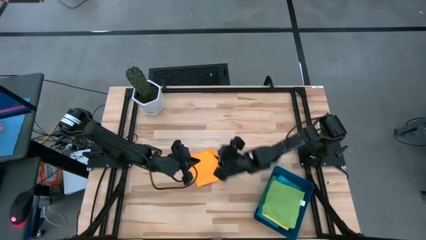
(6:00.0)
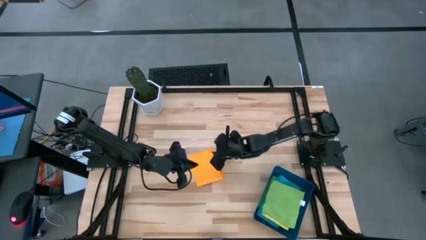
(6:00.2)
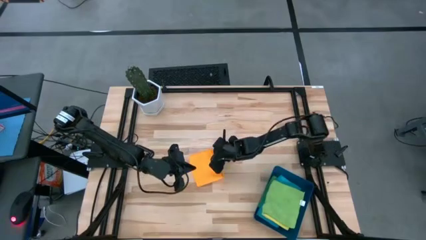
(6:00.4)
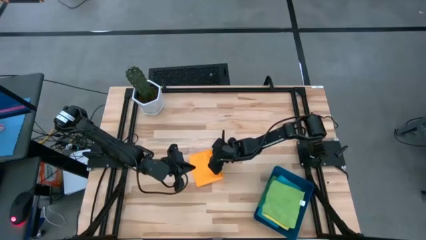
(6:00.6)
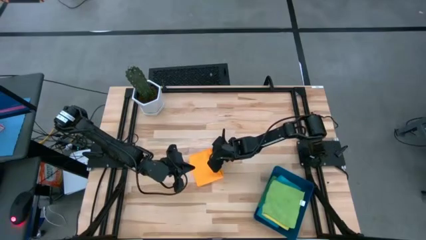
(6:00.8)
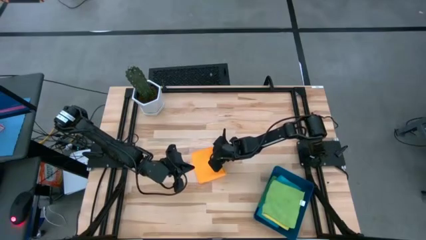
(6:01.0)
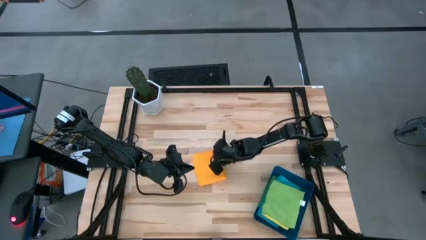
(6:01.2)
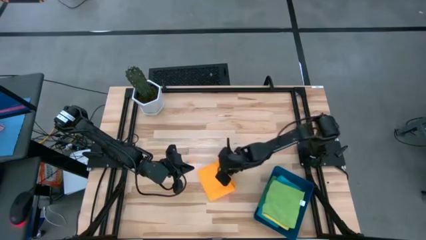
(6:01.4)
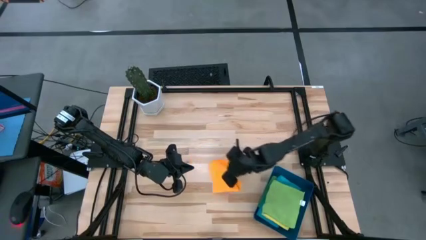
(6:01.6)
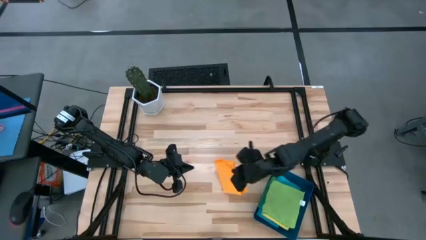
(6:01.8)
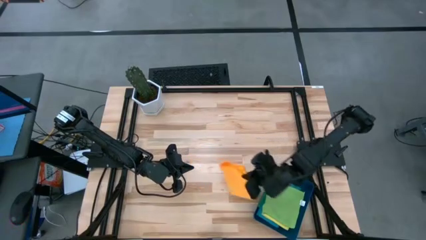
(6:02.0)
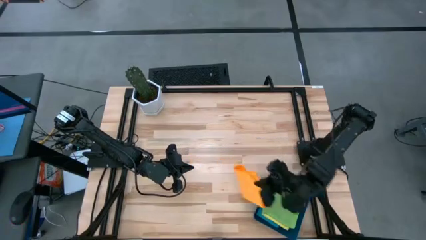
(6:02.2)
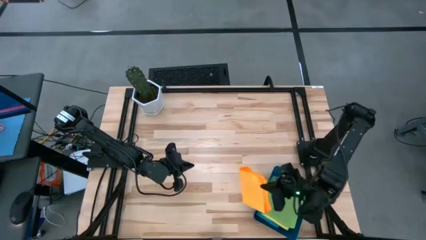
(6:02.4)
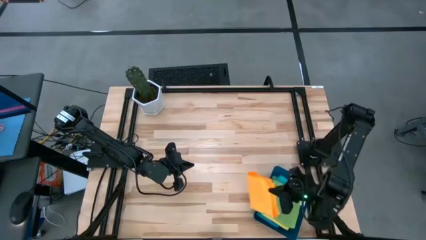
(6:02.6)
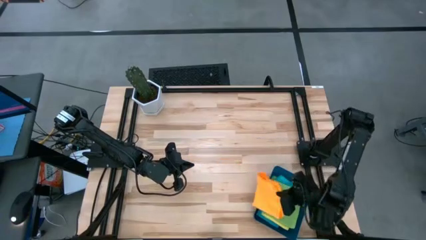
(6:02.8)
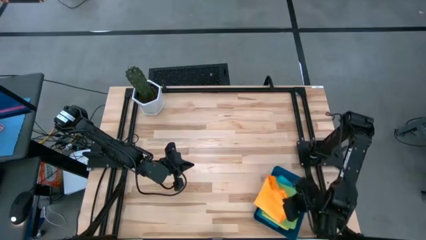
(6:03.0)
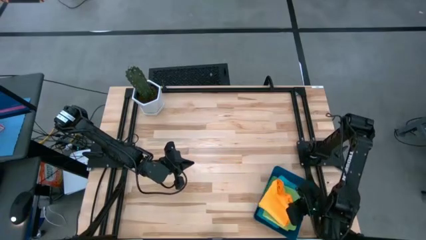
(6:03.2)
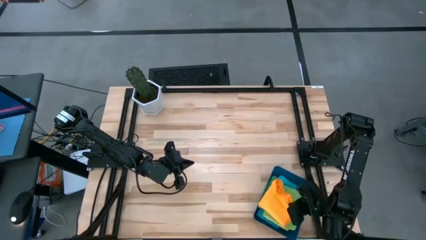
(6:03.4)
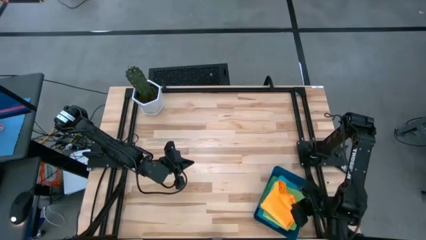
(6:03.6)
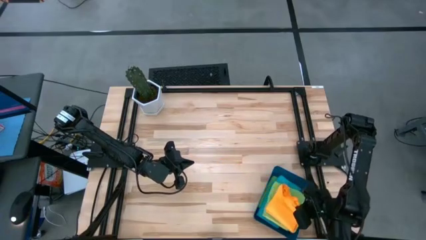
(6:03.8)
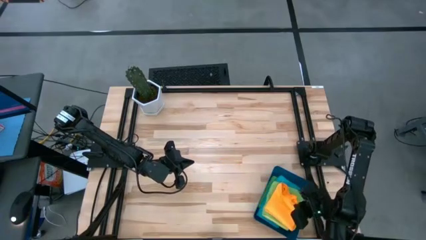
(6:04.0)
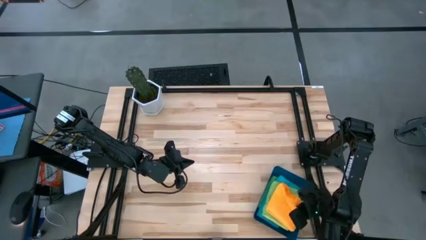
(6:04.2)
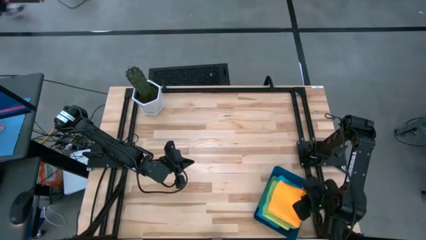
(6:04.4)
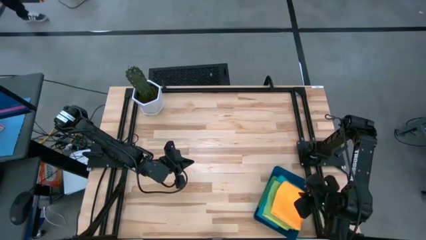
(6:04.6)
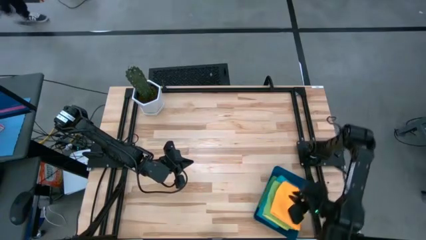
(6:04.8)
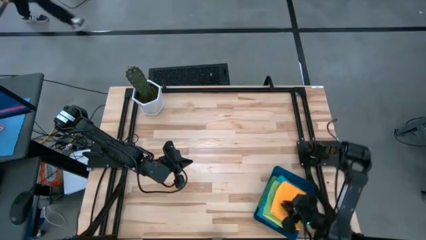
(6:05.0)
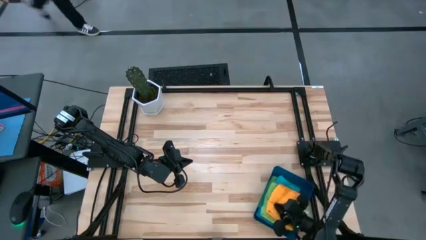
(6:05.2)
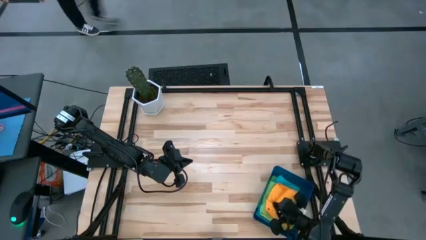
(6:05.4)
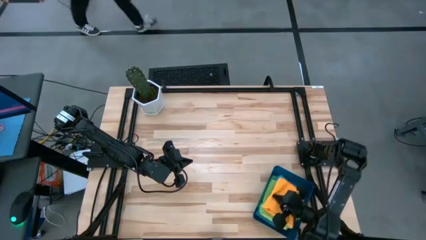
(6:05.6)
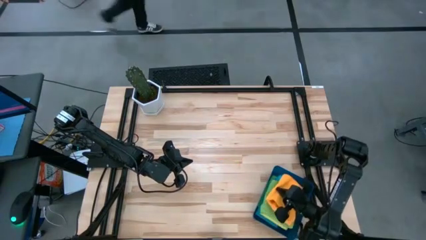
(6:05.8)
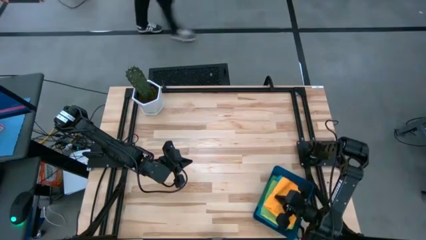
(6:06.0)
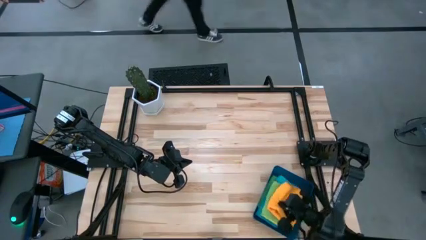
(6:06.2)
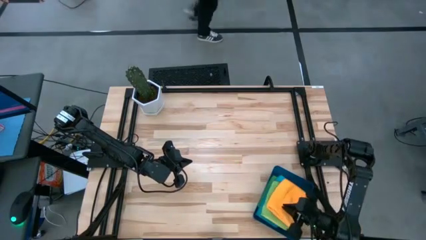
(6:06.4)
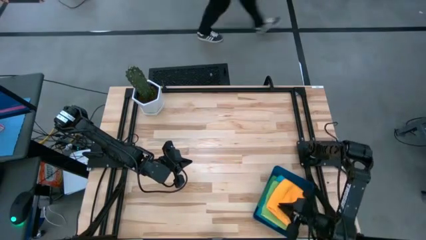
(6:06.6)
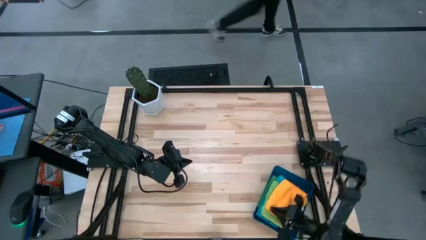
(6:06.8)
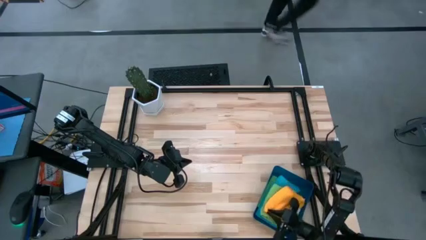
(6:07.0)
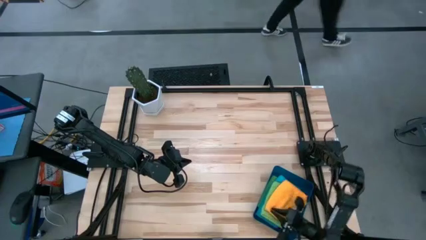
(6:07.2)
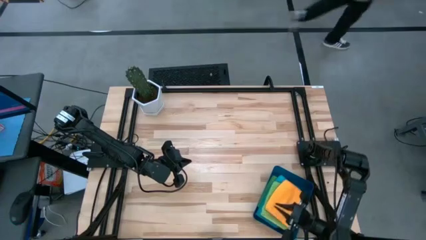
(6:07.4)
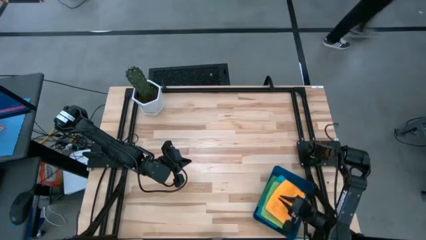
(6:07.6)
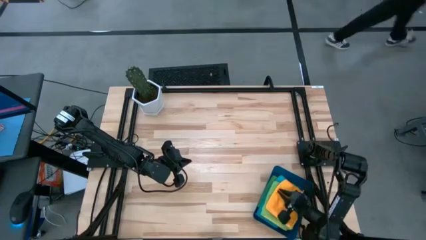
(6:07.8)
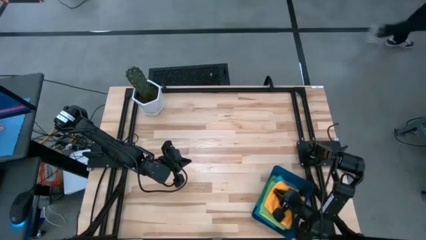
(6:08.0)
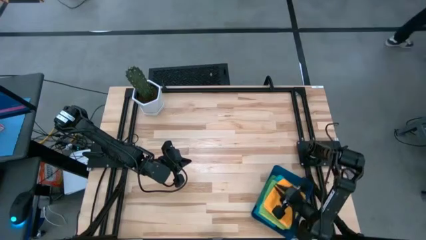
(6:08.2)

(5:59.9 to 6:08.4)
Task: Fold microfiber towels
Put the folded orange microfiber towel into the blue bin

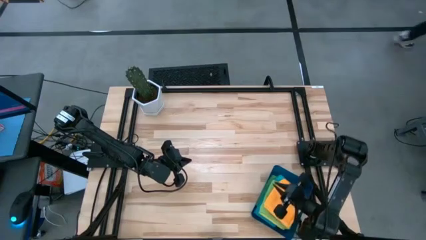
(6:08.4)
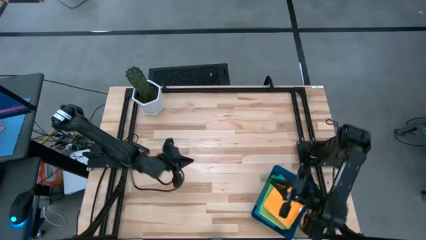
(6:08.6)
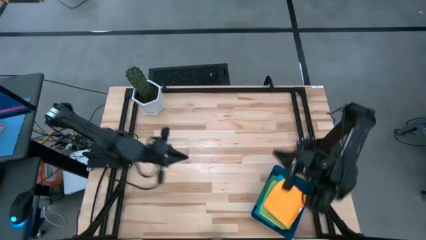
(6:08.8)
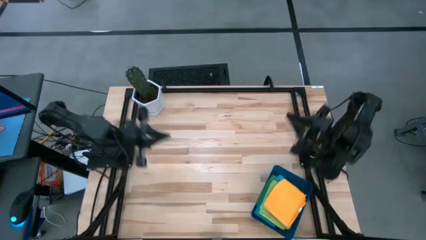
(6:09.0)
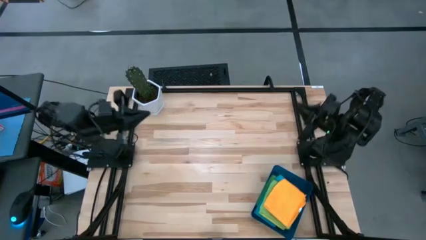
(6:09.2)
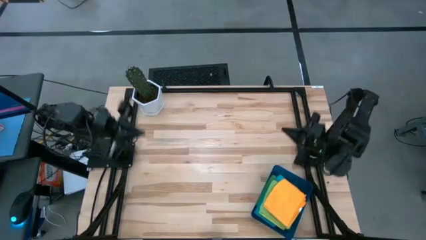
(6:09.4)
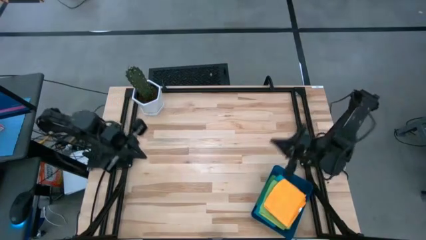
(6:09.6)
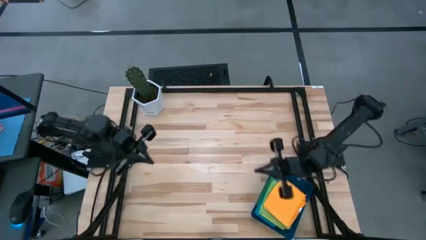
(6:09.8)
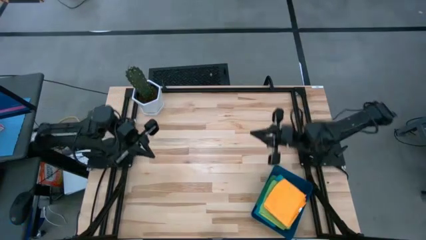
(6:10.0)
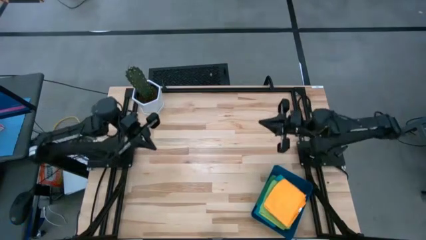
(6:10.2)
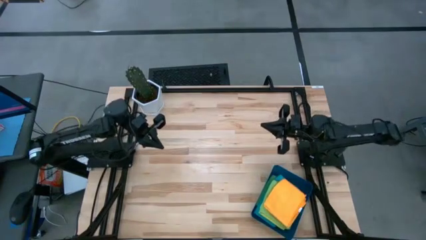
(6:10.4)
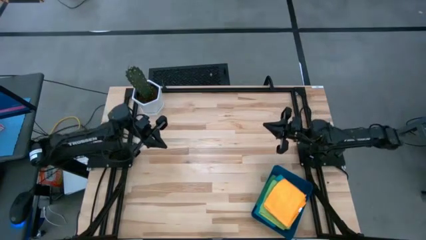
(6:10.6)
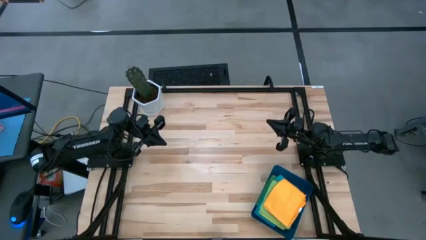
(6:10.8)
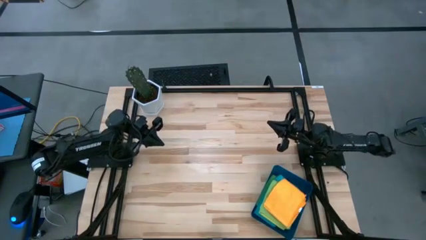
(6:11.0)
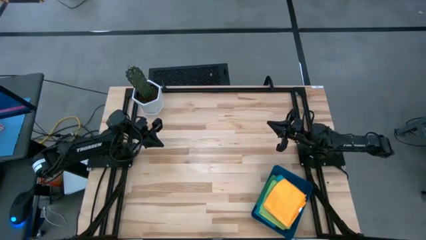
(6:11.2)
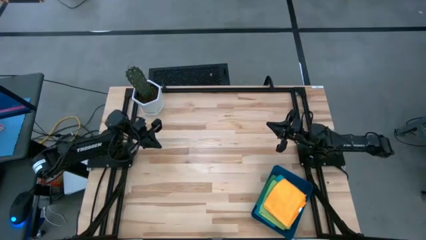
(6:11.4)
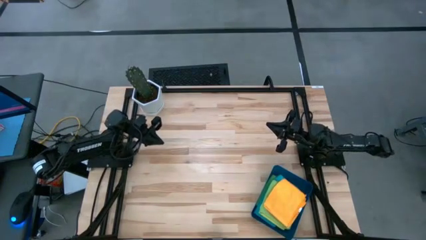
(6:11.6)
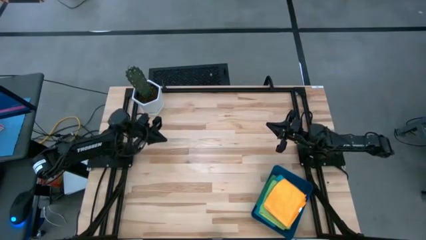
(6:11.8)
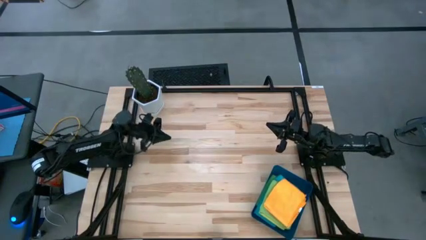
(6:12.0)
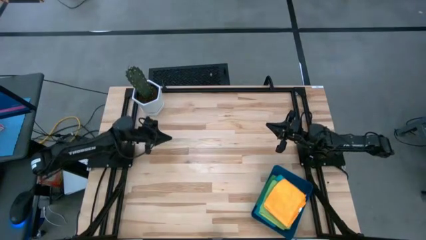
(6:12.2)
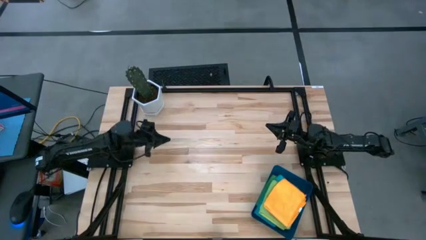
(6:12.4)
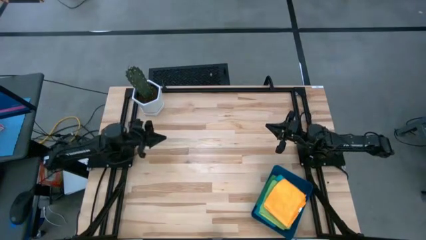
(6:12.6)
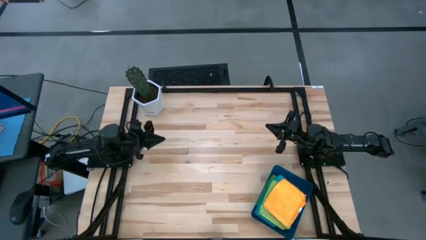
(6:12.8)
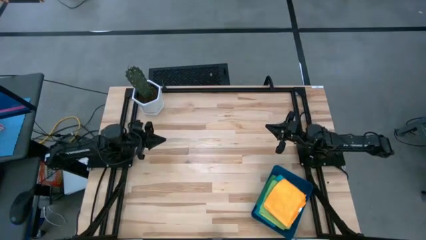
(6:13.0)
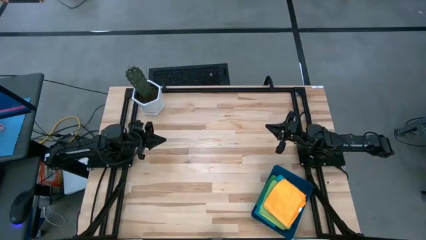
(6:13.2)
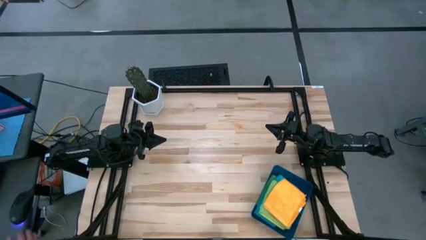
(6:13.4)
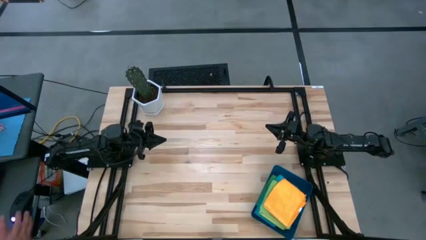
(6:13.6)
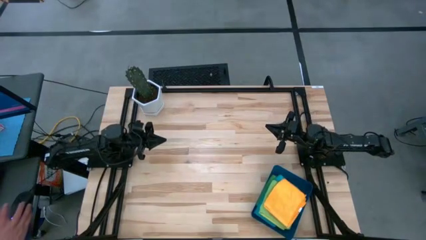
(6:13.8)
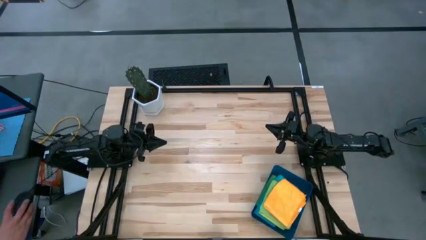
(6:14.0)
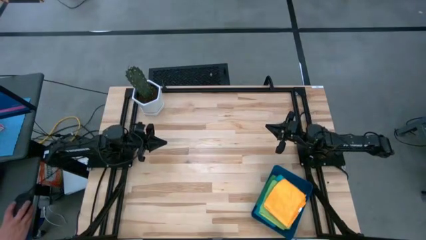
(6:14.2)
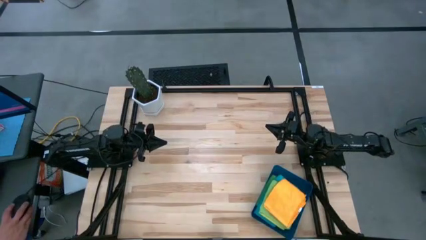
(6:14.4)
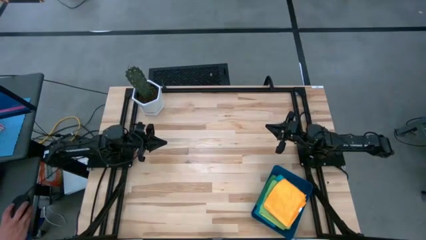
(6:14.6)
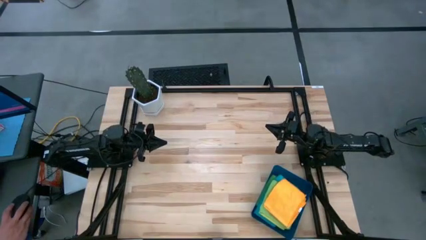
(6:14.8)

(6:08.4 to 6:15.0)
Return to Home Position

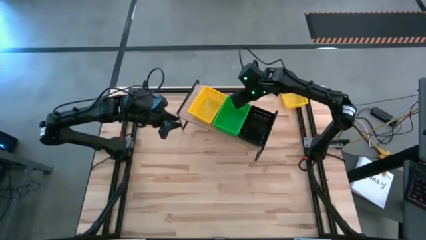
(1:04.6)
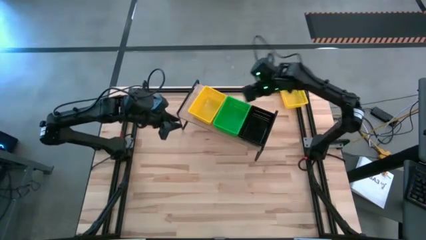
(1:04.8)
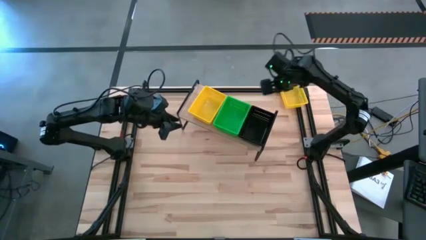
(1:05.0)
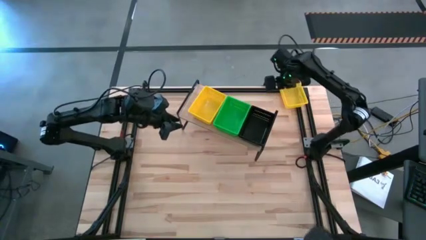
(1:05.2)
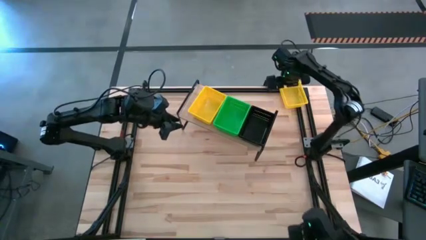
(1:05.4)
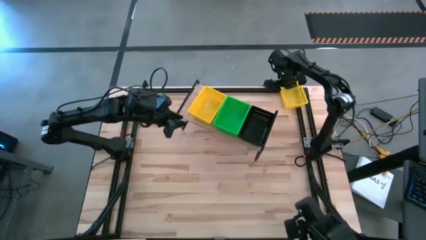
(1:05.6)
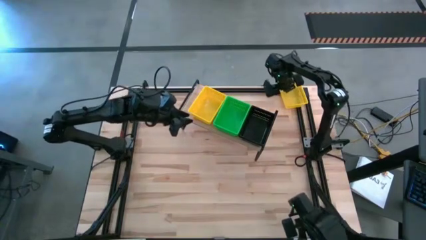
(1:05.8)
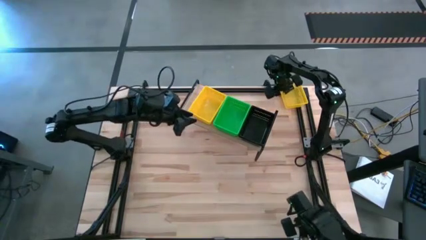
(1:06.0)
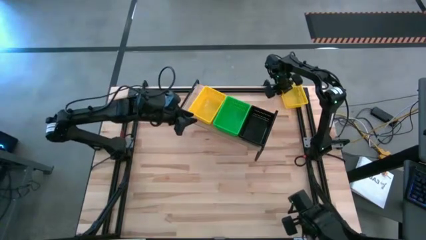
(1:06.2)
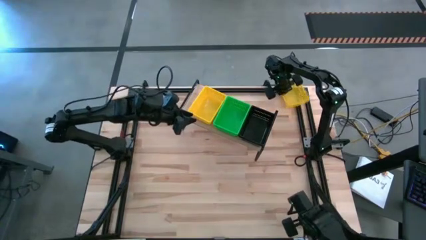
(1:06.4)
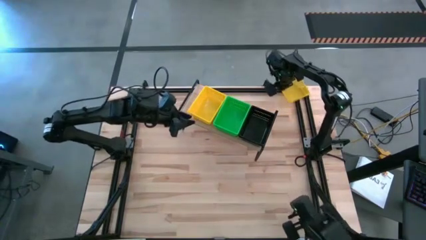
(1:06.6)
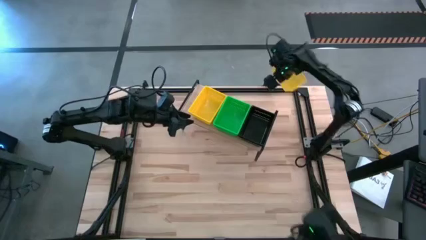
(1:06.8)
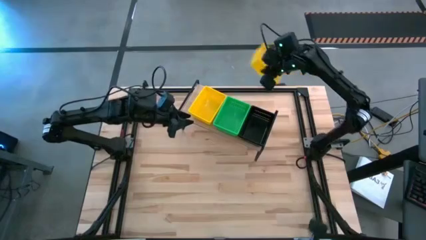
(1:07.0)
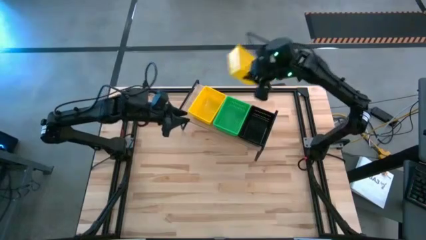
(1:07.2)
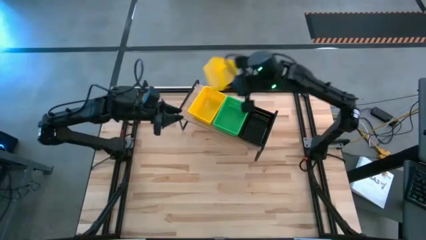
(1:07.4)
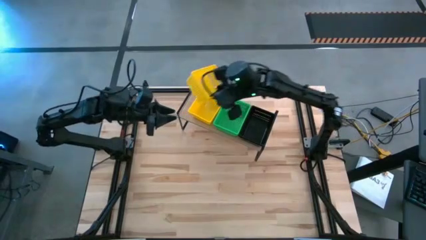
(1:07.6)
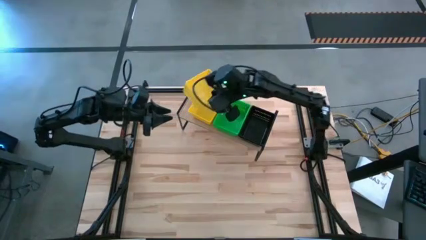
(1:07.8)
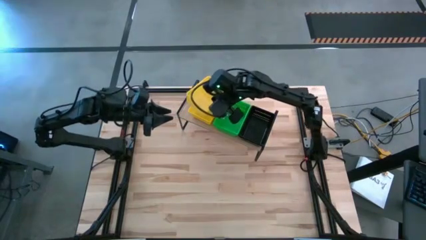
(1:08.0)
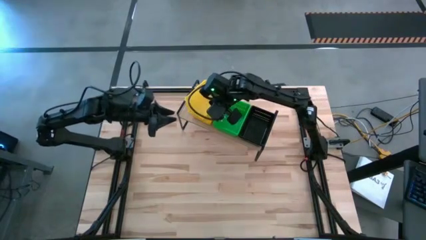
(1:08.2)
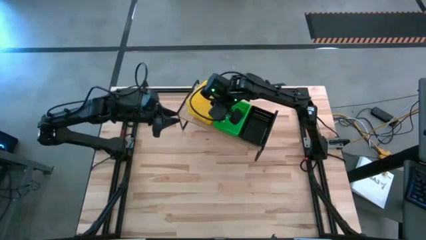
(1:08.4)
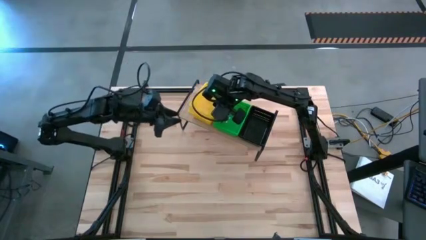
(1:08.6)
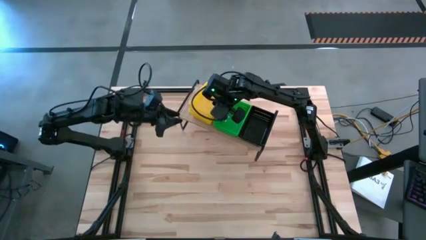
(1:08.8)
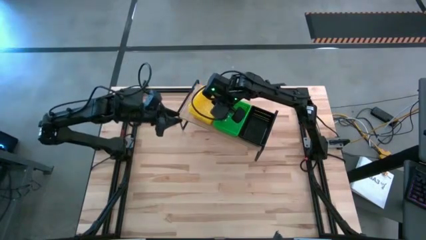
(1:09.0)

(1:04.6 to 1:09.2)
Task: Stack baskets on shelf by color
Stack the yellow bin on top of the yellow bin
